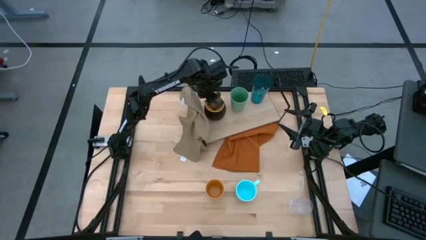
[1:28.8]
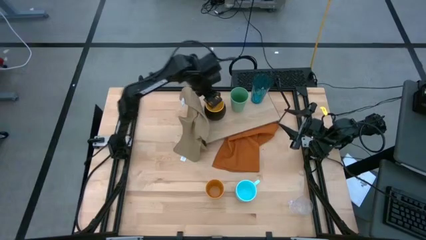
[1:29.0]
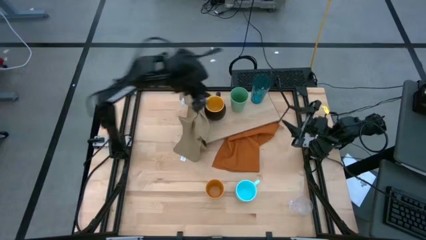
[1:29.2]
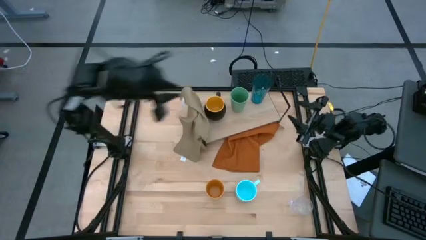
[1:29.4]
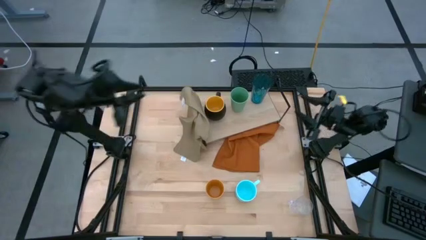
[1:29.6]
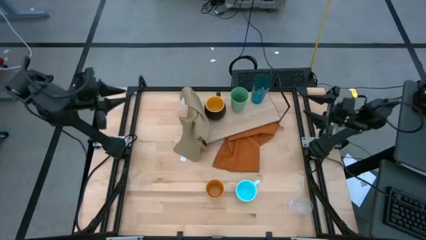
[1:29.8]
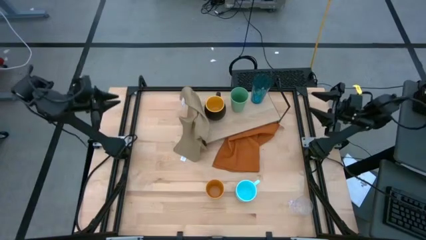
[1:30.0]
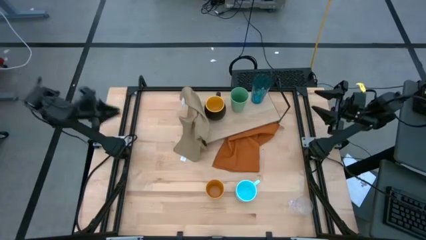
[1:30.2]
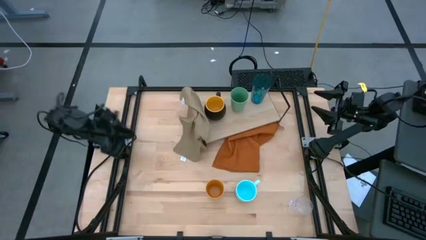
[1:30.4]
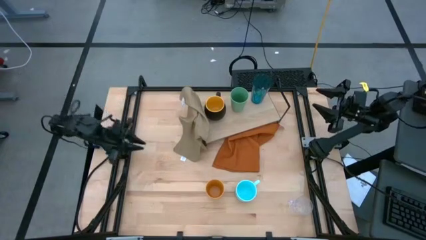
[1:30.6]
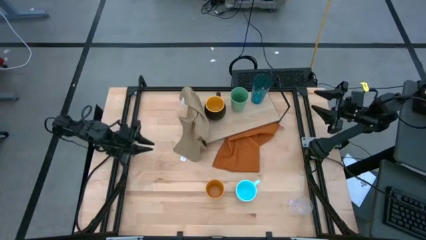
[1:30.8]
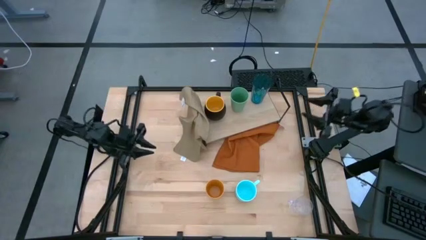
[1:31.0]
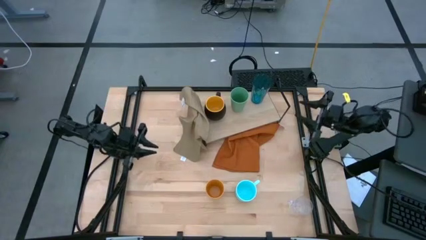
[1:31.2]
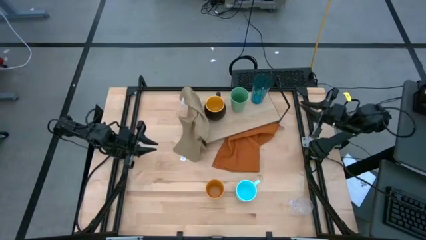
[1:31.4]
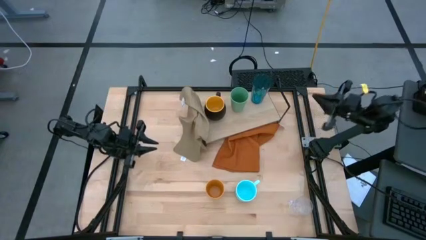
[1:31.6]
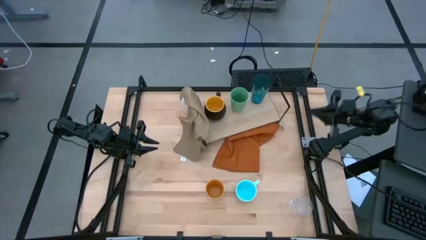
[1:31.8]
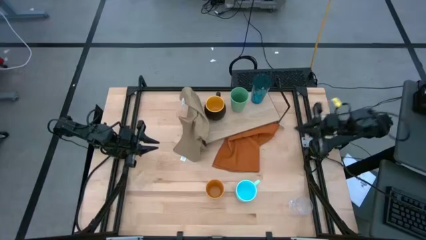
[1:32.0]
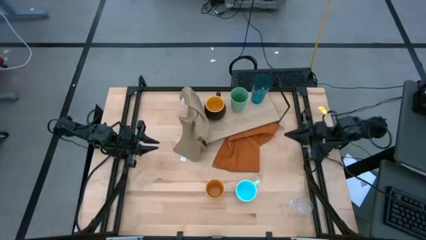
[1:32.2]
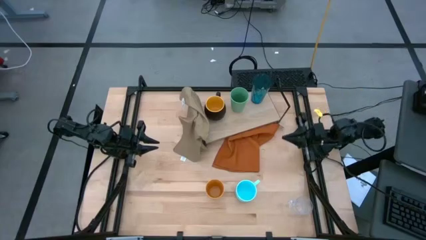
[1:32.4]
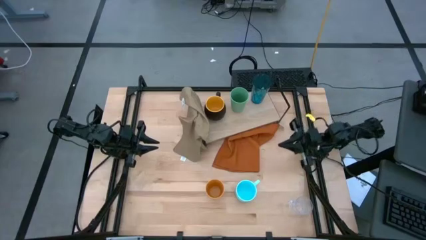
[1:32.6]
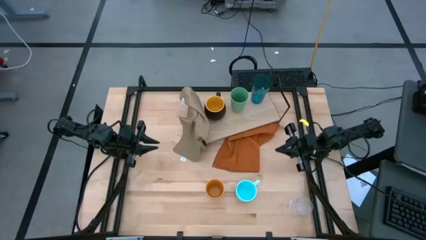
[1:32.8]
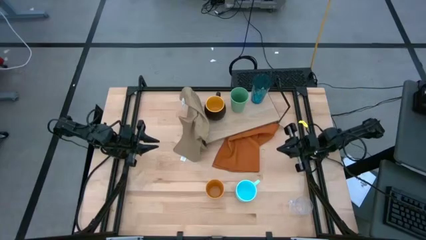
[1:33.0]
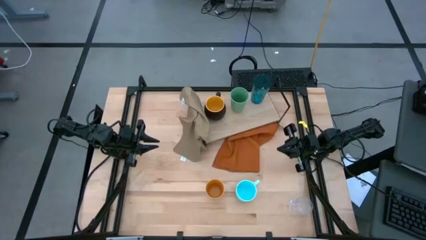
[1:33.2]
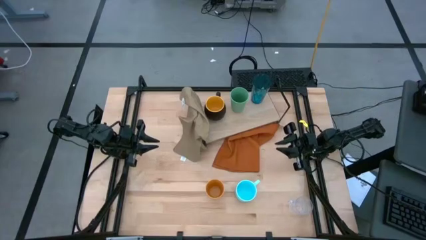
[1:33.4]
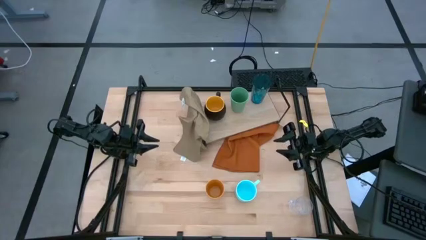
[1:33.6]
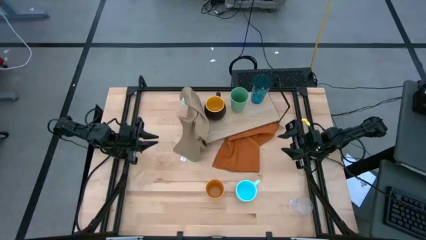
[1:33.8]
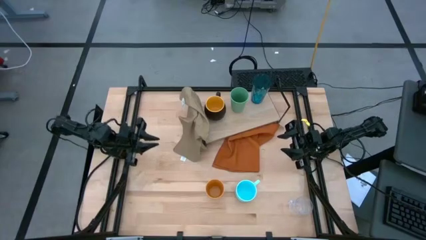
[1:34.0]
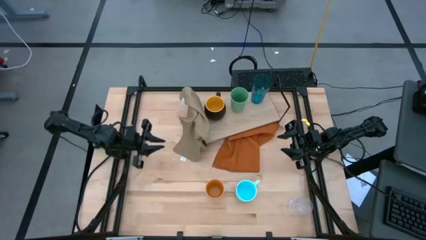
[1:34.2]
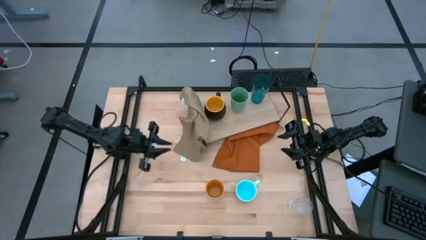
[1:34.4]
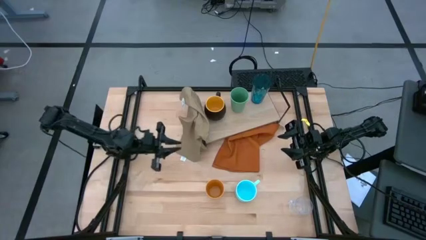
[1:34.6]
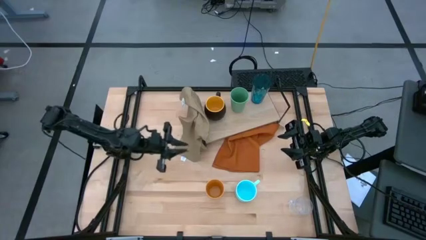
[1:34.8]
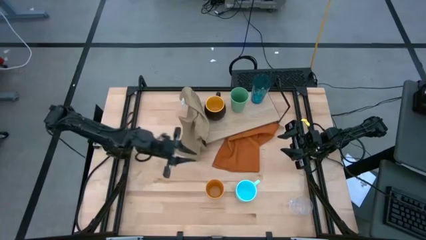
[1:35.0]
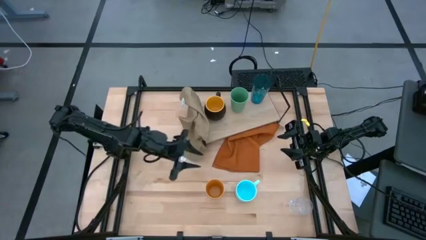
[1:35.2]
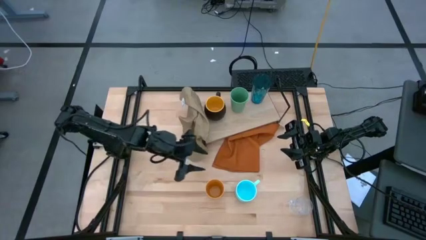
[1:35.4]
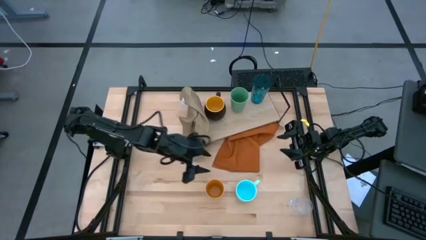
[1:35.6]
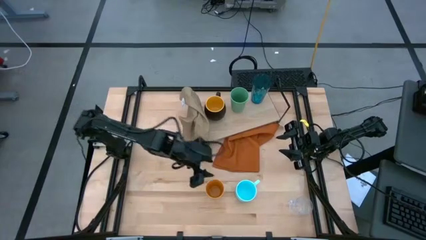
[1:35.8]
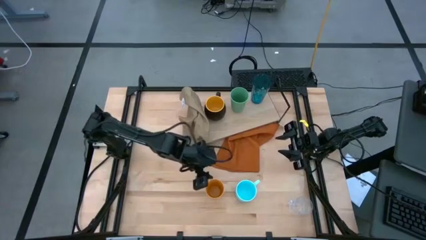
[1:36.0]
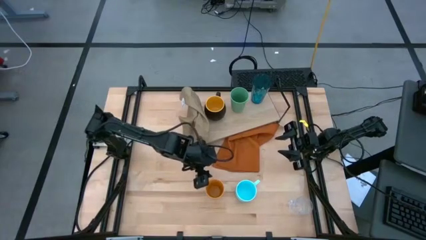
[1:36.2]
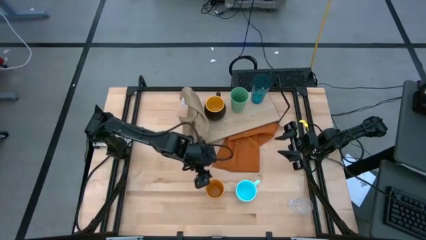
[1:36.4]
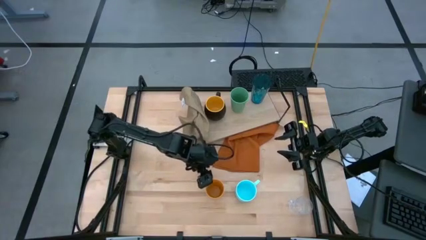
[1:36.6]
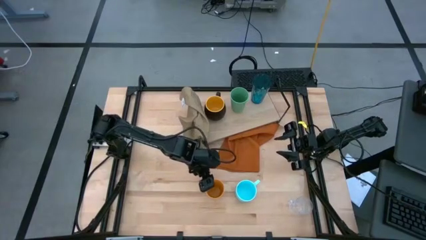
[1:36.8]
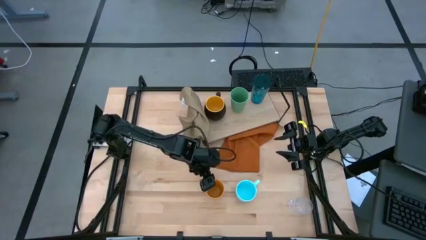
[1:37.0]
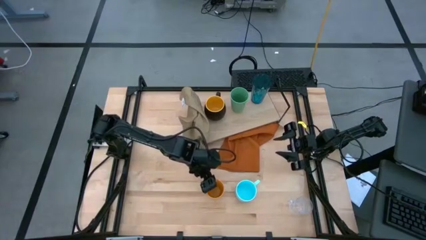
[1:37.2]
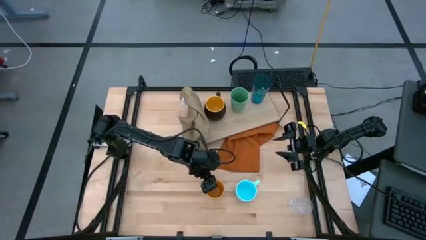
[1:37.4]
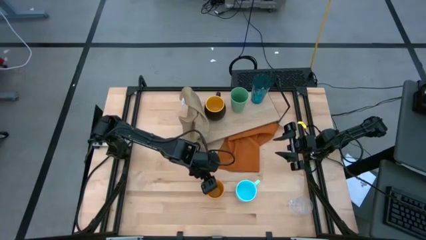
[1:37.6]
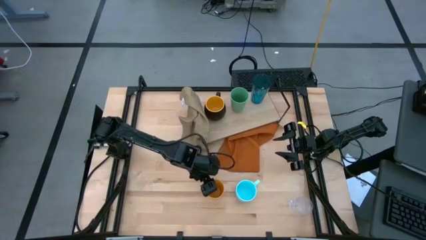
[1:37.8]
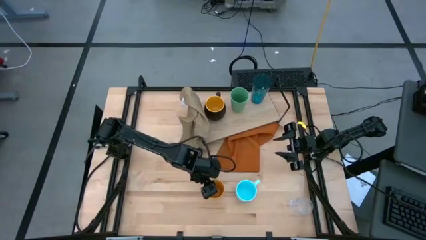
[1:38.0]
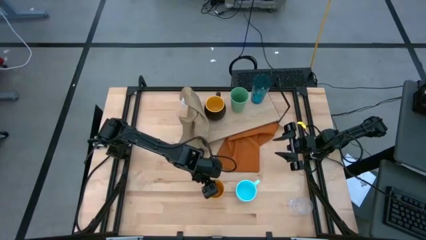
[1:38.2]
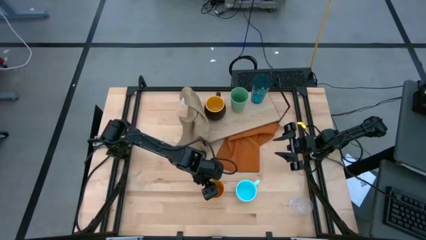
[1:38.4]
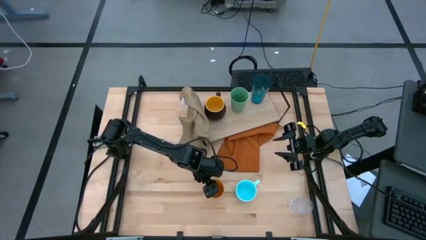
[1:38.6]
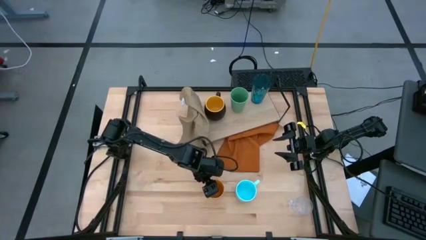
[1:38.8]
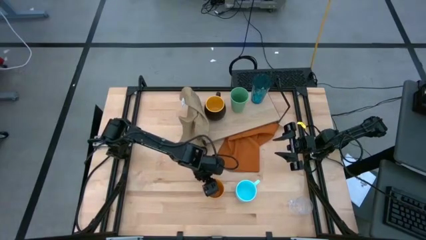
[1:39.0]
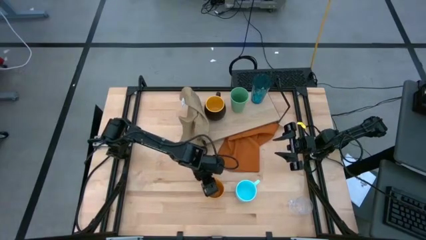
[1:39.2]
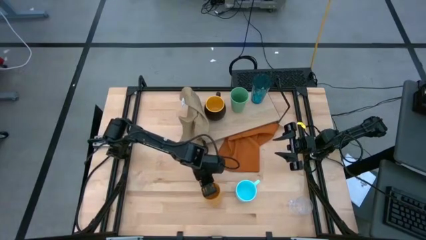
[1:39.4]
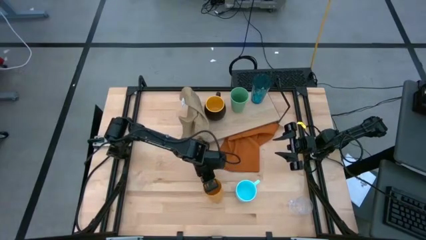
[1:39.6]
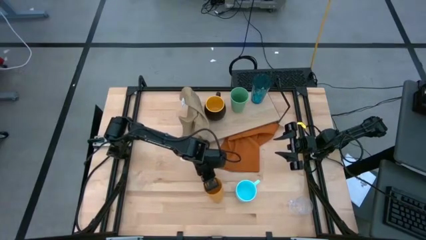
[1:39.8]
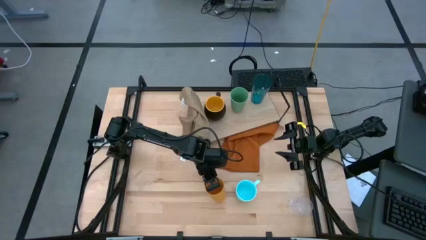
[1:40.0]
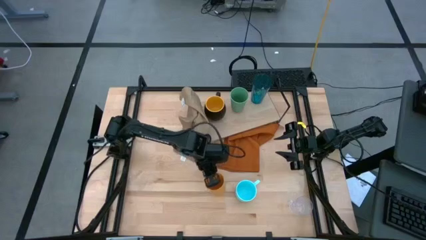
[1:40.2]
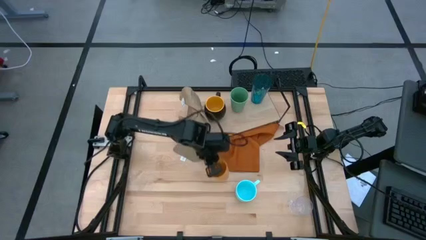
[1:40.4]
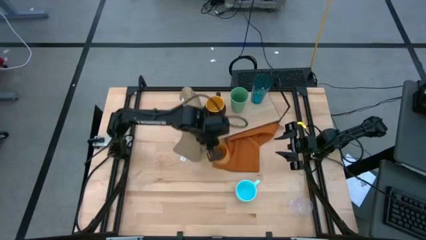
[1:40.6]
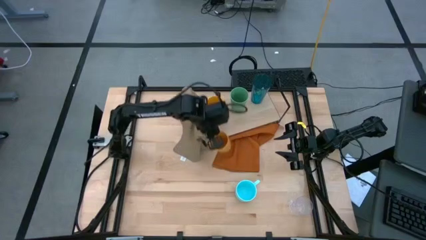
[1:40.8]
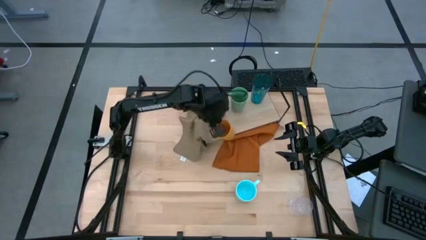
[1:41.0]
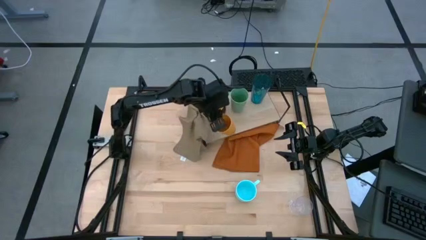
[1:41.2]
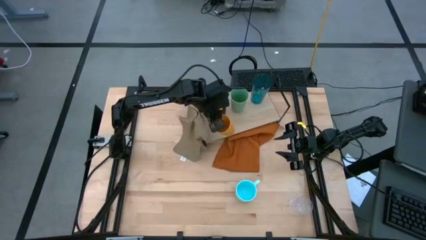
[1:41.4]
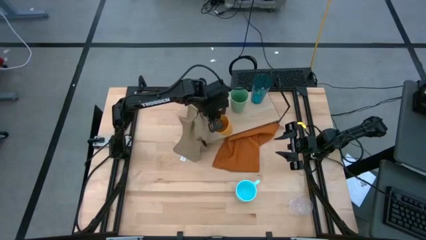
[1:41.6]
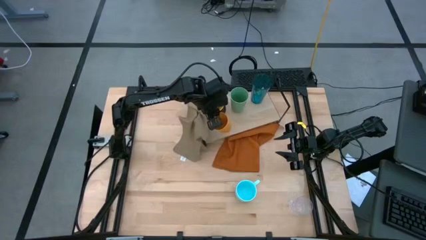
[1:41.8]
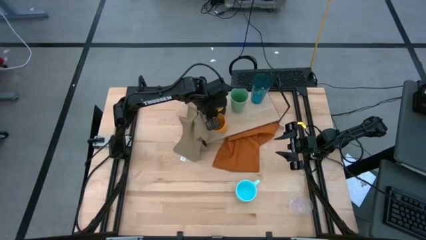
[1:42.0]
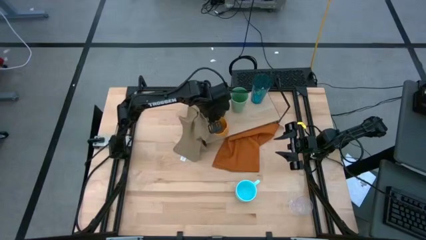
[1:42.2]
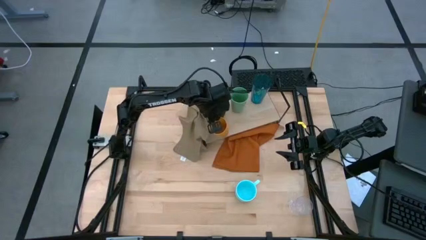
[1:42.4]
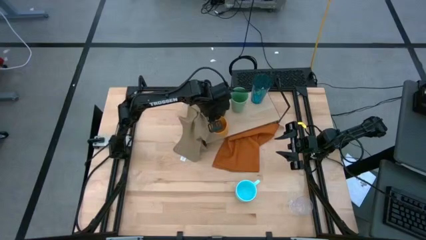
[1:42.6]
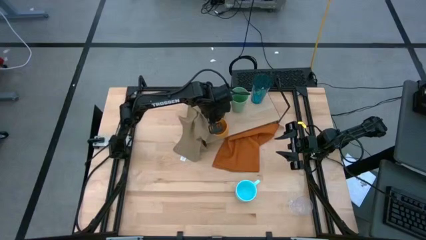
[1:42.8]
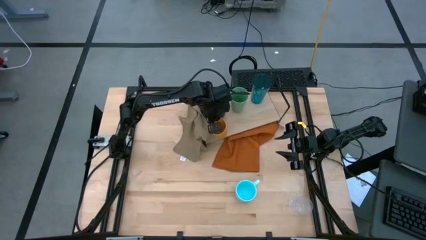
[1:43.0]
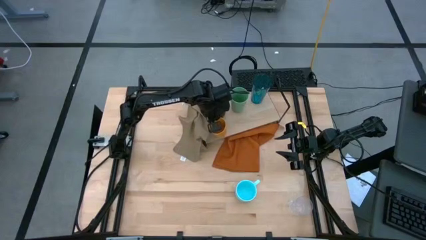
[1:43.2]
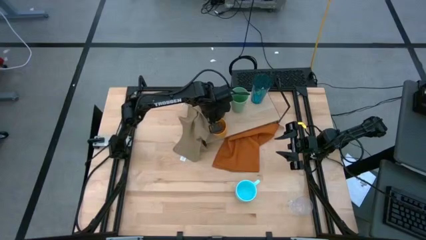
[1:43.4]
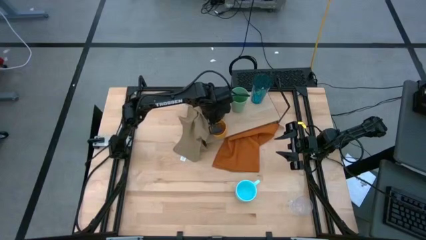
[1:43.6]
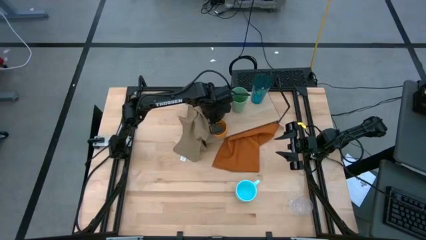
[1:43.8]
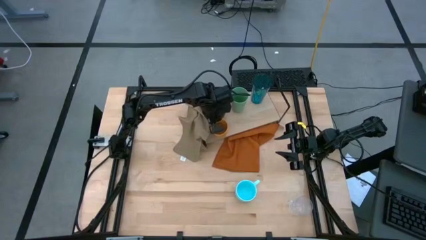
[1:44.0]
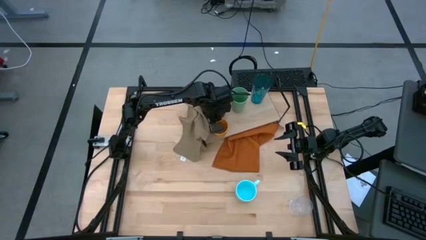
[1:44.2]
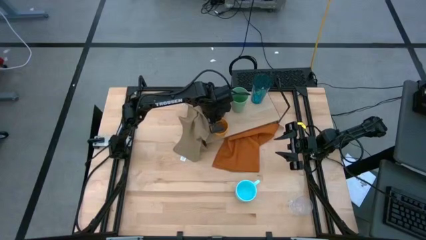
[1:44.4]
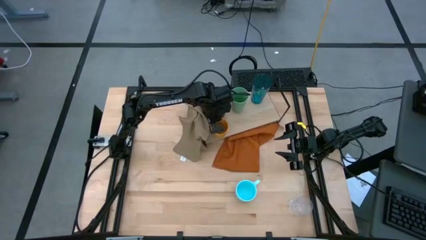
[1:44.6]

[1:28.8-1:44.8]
Task: Stack small to large cups/mugs on shelf
Put the orange cup on the shelf
